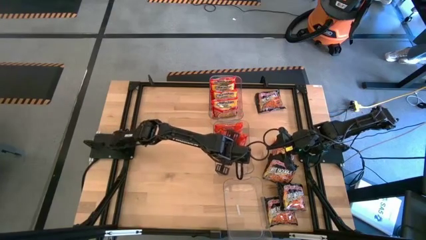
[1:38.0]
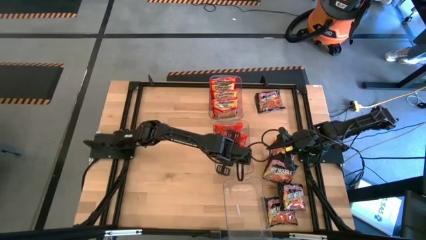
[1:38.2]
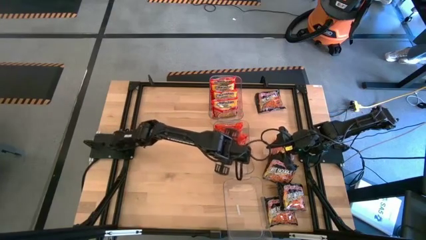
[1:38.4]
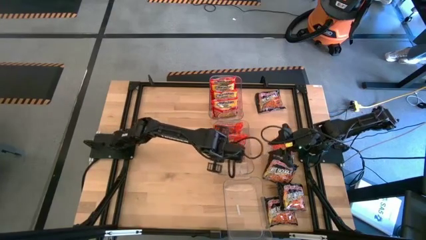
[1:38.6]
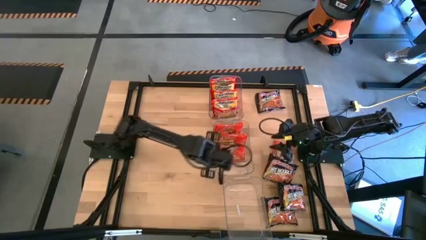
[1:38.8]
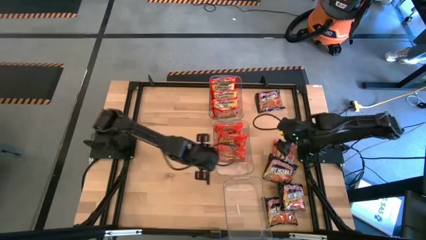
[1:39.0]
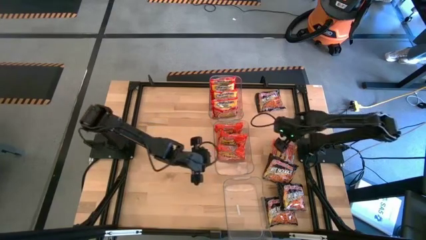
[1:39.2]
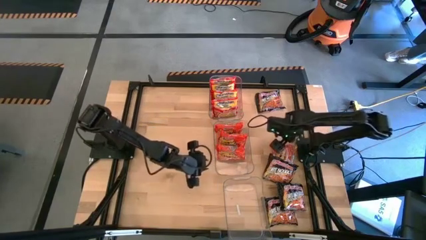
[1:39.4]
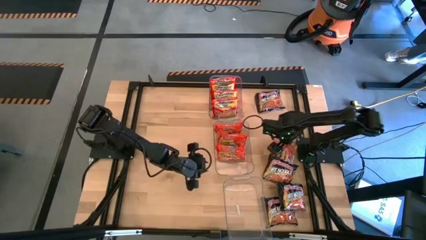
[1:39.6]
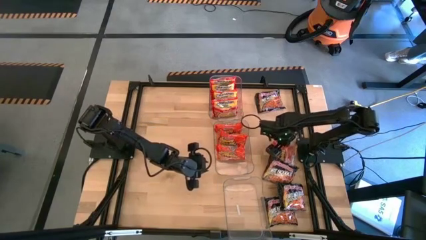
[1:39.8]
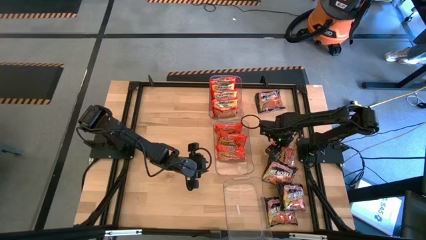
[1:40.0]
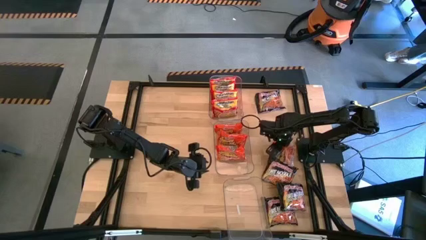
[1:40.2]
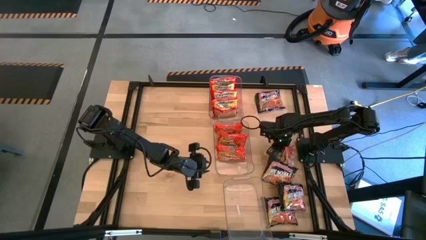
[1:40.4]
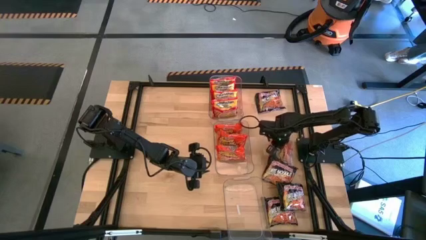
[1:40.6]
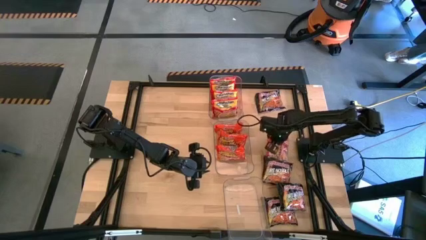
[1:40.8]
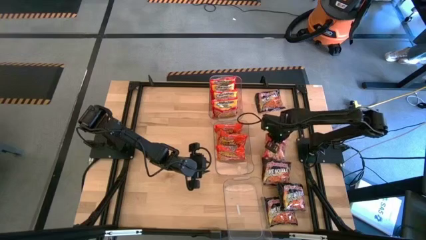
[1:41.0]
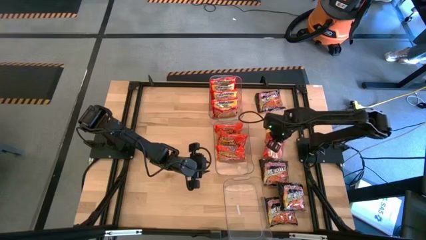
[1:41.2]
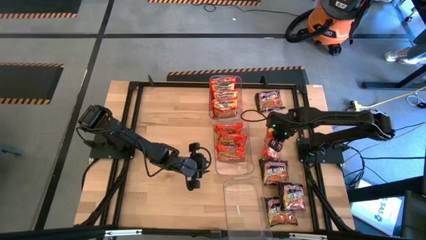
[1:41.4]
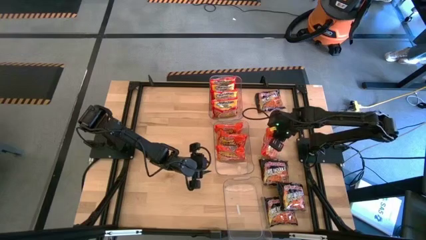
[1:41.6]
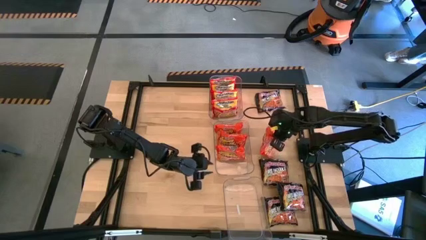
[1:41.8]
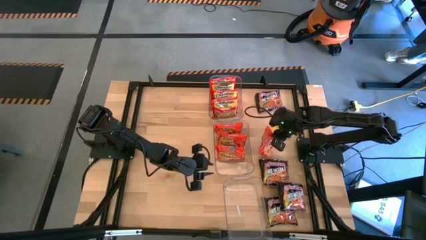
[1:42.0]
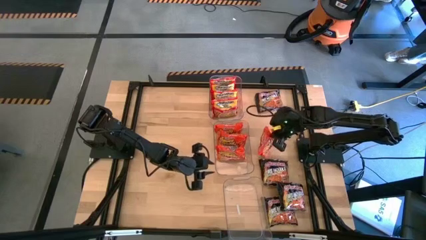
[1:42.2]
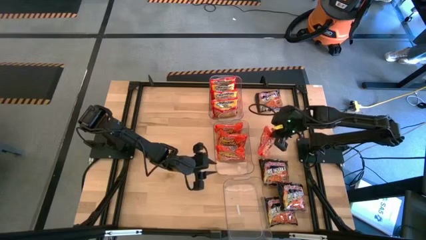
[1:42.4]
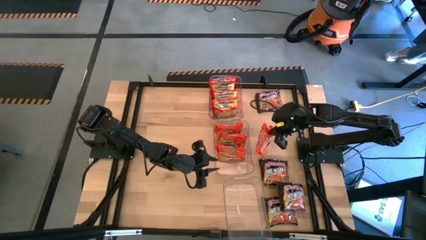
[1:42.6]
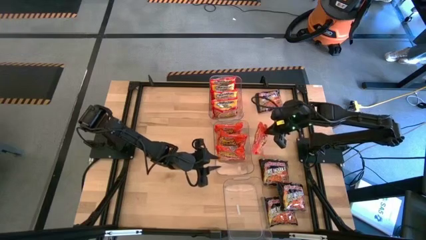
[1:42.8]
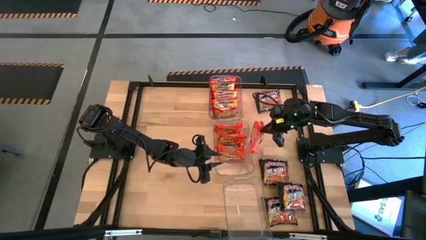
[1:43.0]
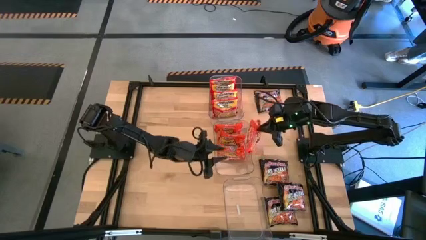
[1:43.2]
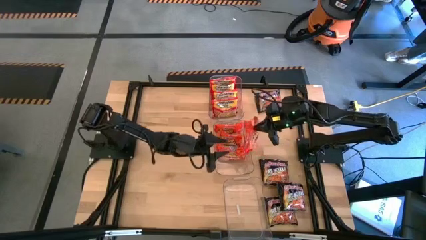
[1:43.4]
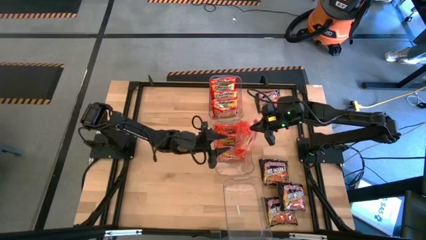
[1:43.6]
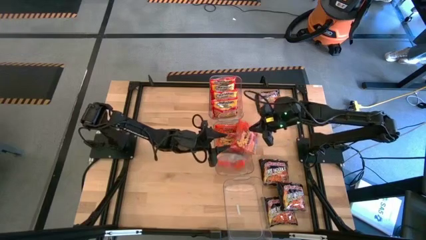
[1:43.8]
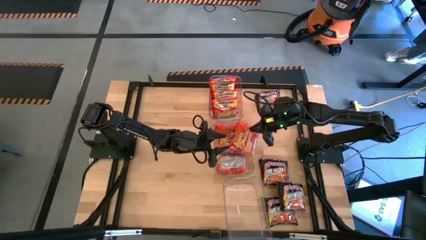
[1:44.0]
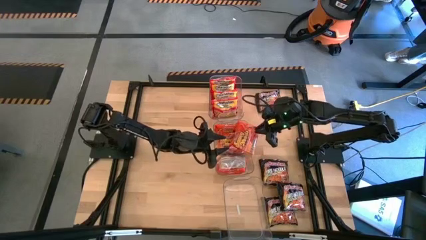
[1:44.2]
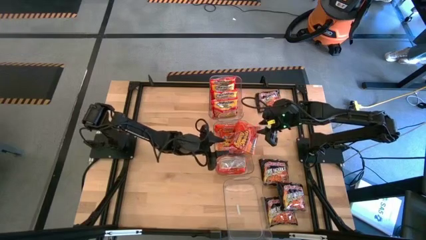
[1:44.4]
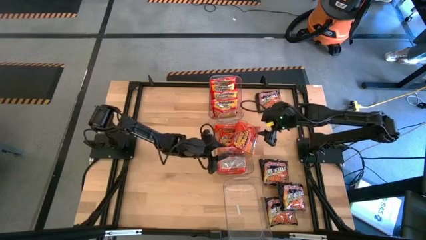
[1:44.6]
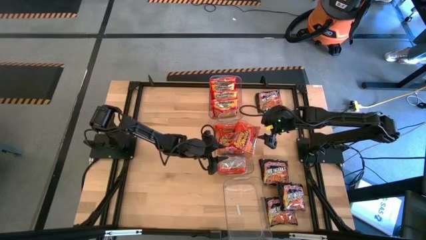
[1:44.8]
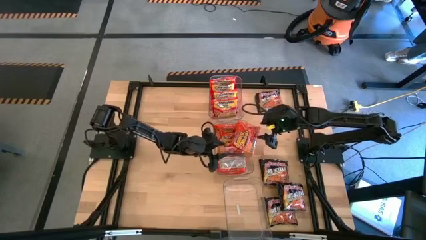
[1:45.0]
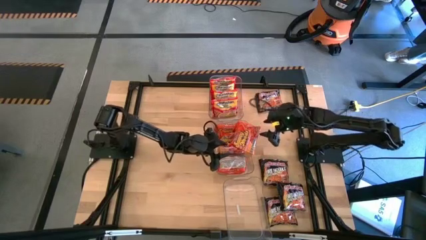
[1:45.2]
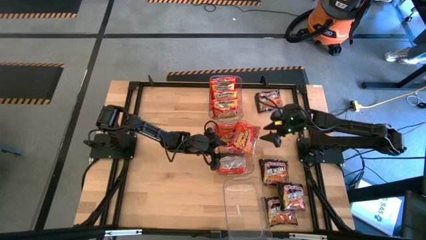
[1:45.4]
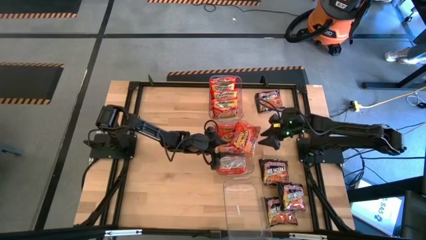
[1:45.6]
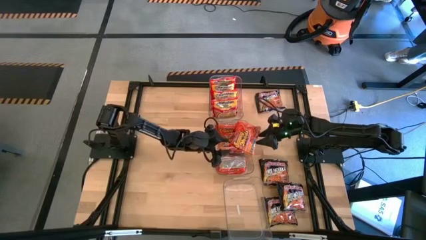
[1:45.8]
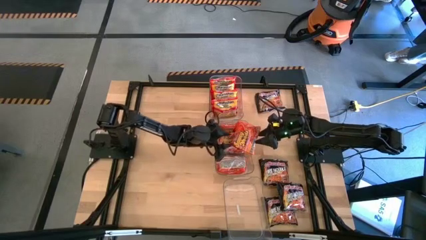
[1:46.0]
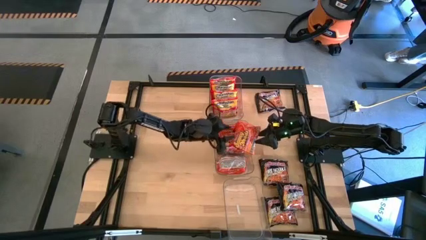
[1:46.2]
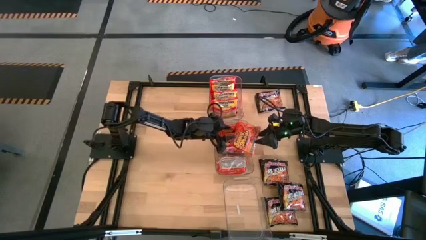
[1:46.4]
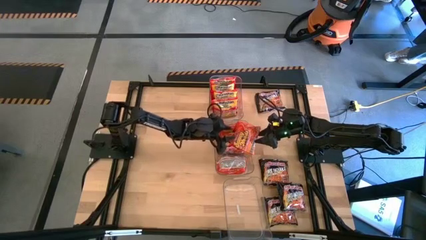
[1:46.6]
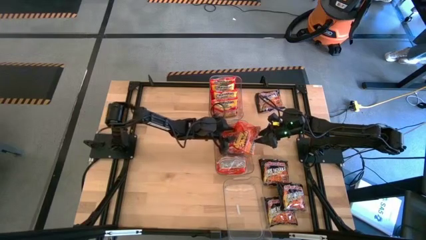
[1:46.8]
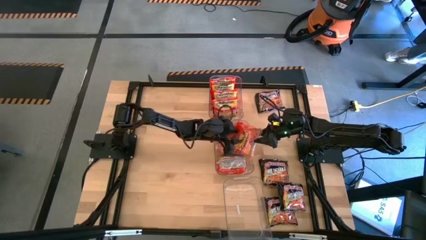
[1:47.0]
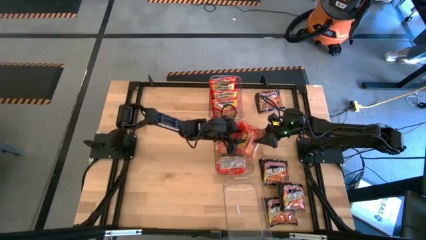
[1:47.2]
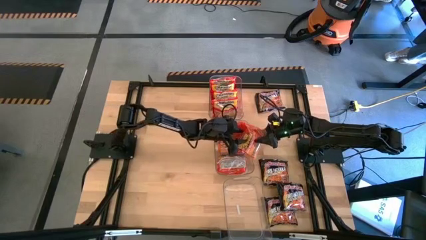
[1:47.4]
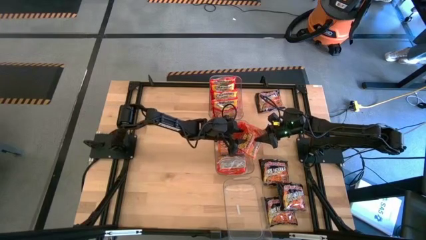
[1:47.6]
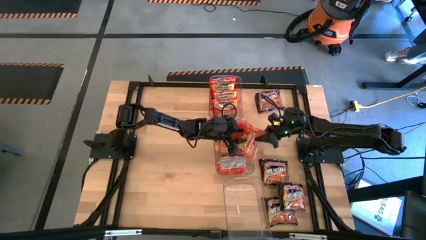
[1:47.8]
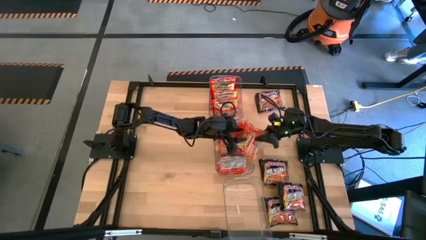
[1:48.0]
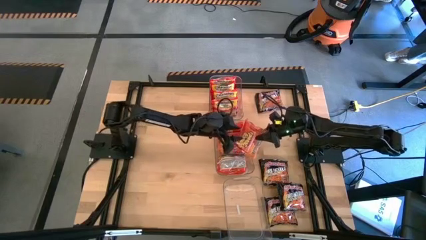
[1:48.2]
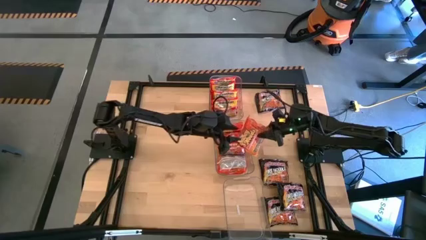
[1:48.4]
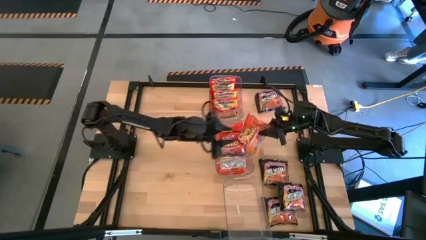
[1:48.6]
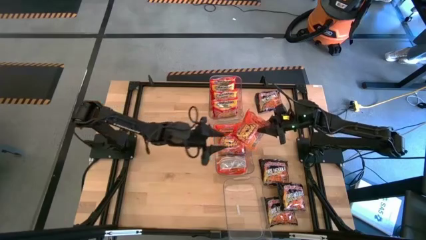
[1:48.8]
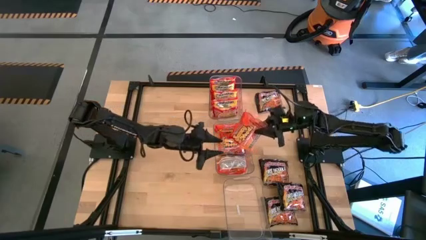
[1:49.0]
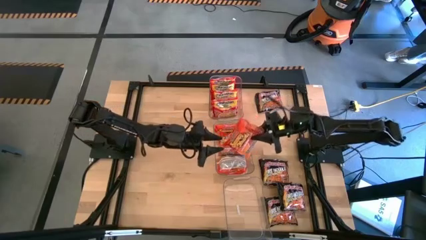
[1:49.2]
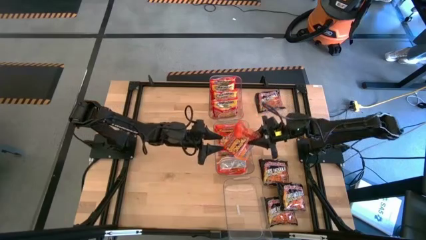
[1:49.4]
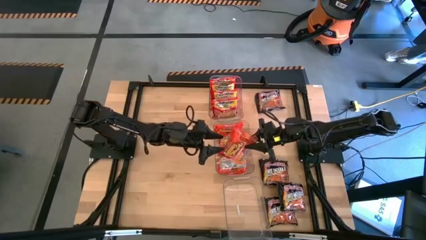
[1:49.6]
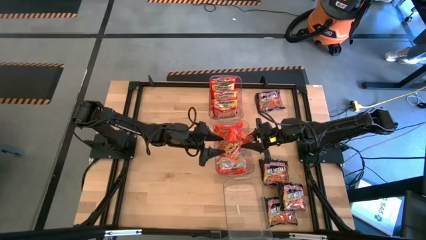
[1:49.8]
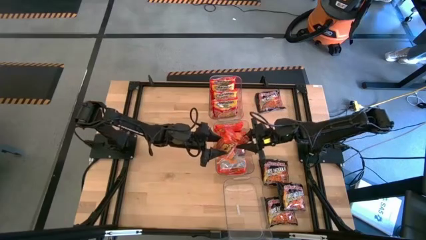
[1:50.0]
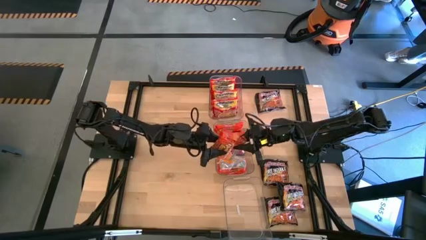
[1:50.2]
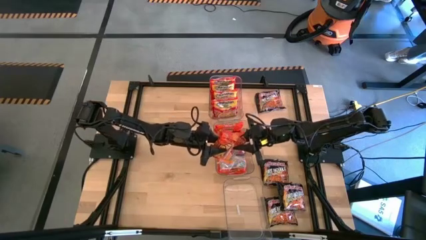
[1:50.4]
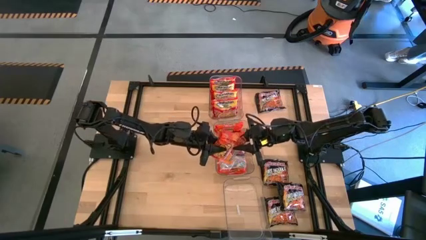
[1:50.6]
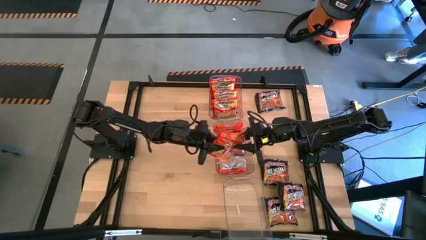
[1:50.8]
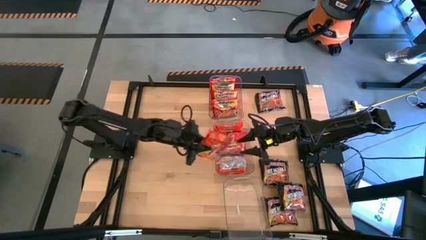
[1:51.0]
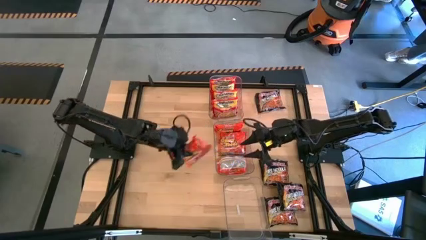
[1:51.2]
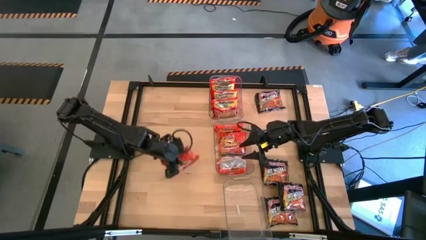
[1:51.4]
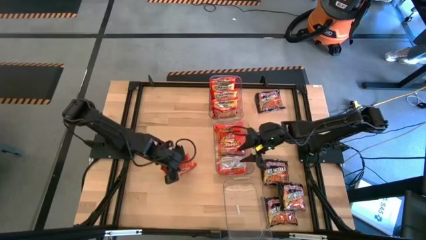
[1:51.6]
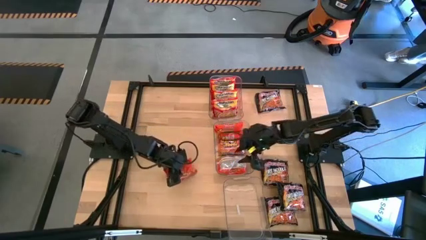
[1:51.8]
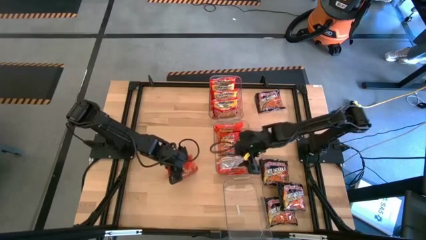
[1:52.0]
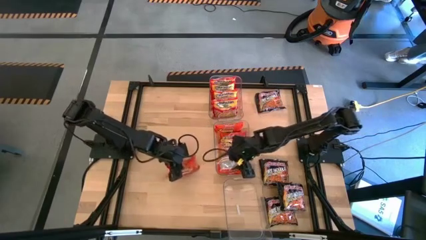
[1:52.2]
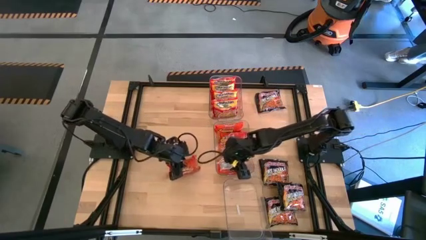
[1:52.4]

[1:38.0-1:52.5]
Task: Sort Maruchan noodles
Put the orange noodle pack into the middle transparent bin

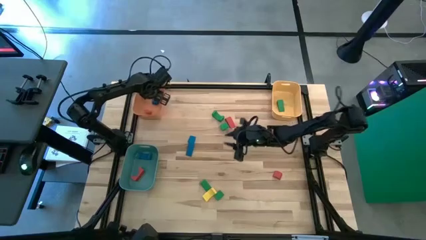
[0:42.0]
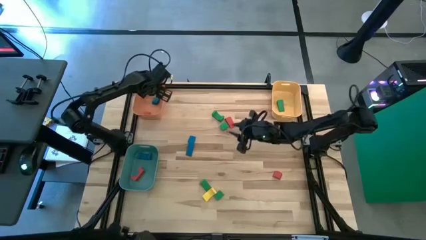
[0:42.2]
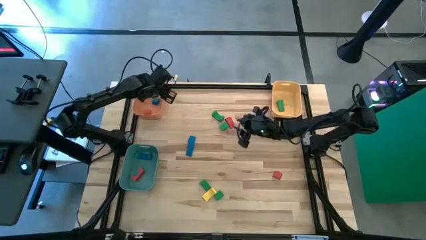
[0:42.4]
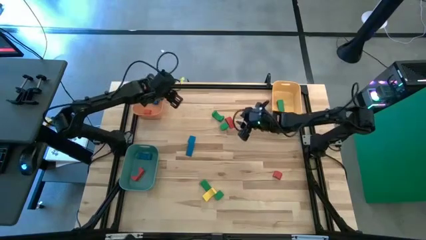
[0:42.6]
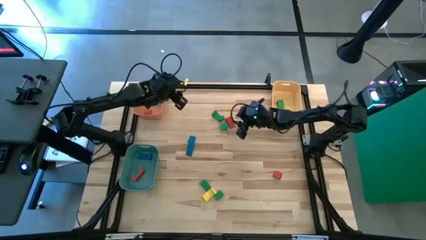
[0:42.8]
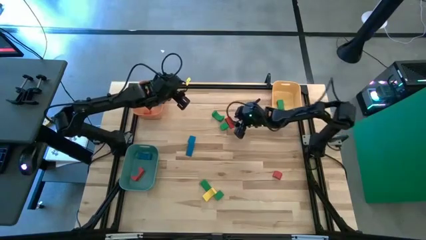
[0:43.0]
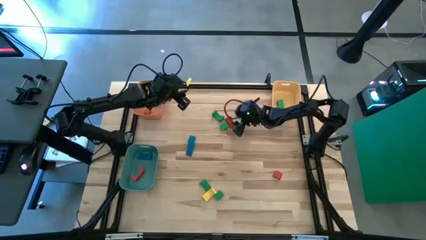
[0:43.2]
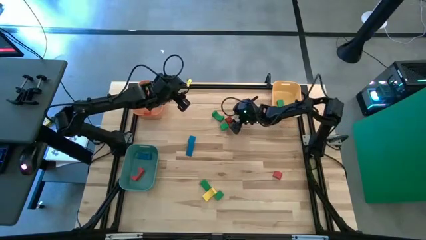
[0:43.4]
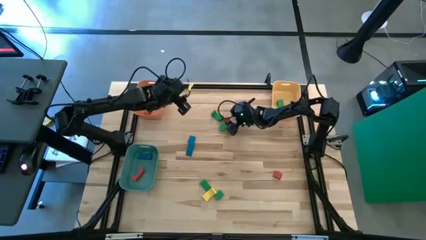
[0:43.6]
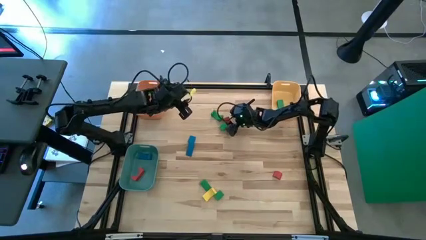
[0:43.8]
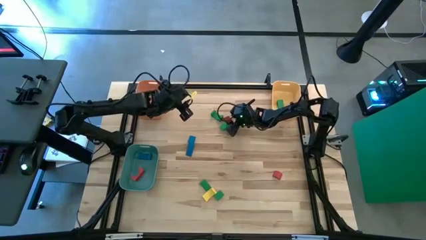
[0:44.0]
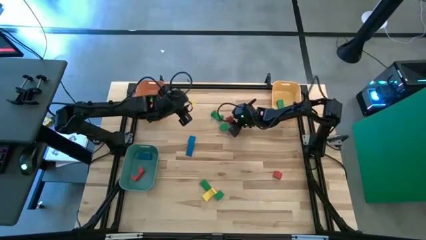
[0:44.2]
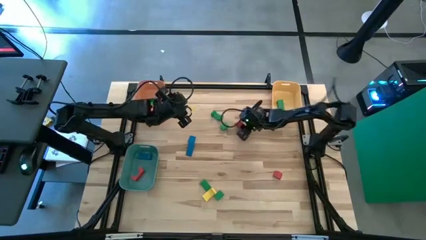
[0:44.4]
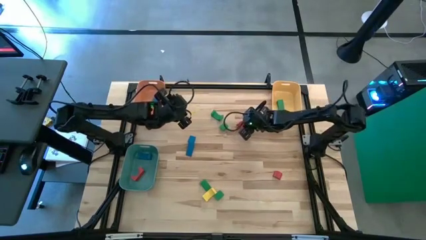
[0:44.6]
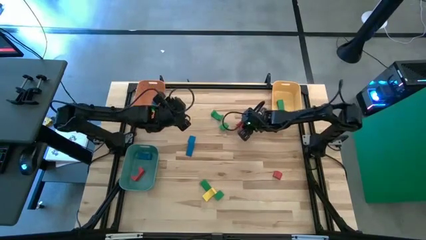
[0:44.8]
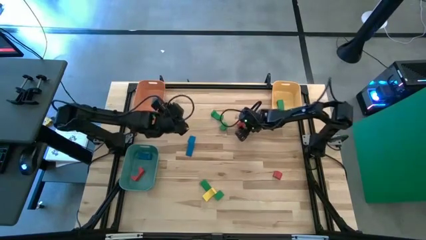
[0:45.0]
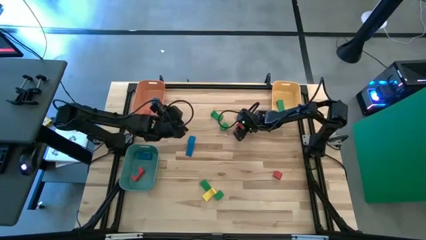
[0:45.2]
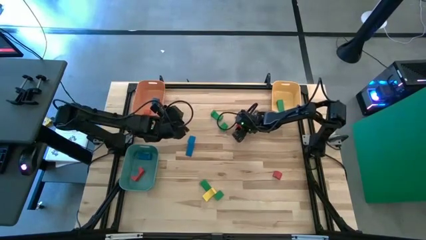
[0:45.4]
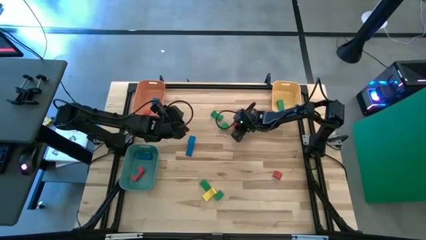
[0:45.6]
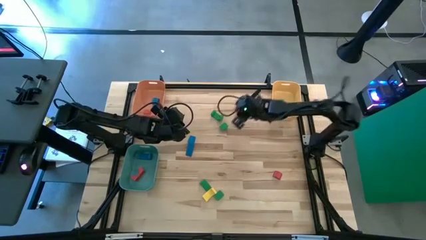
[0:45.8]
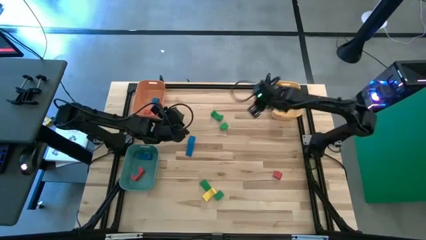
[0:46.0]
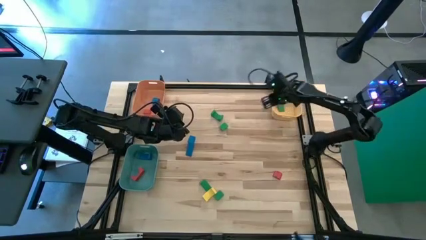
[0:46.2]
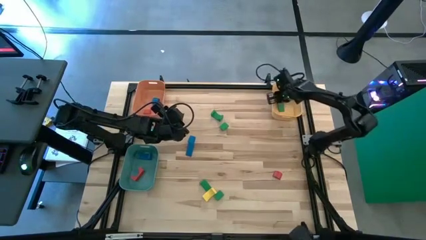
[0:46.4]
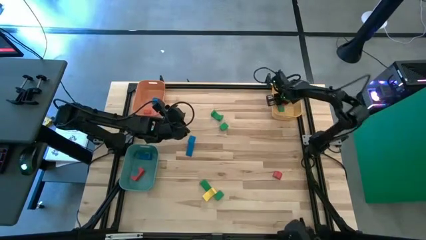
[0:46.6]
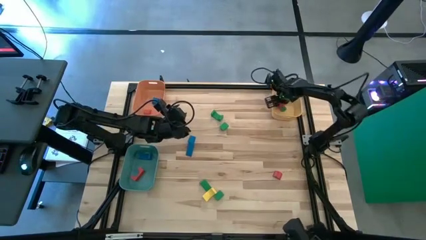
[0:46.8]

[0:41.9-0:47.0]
Task: Sort blocks by size
Put the red triangular block into the yellow bin
